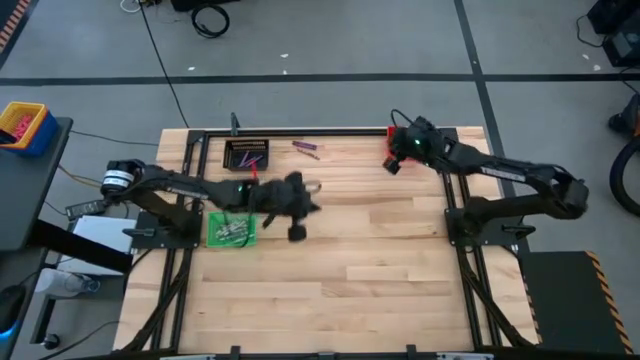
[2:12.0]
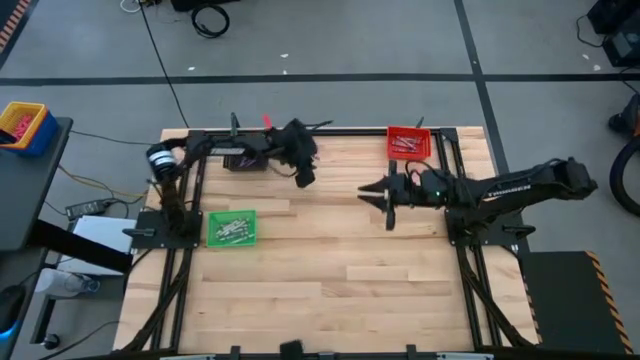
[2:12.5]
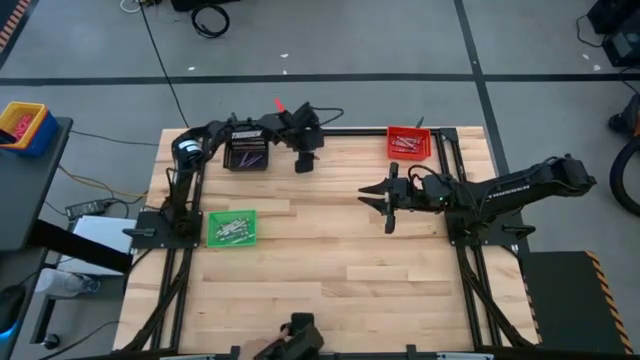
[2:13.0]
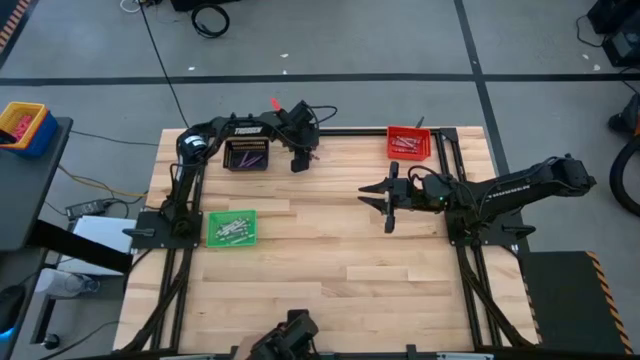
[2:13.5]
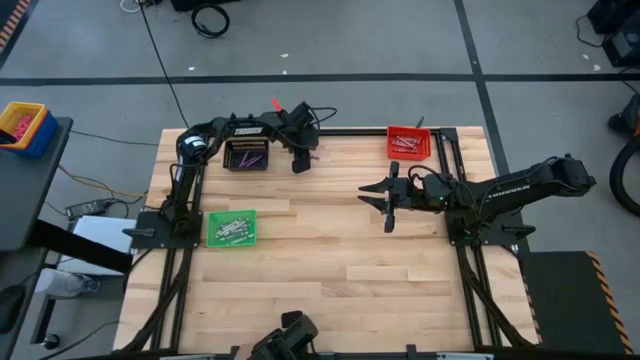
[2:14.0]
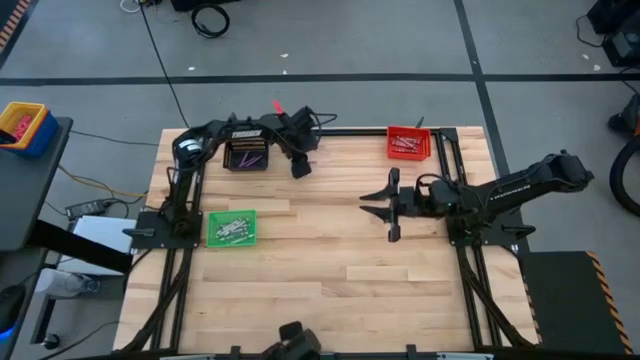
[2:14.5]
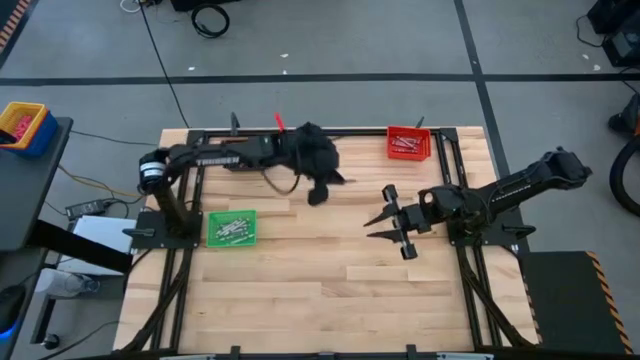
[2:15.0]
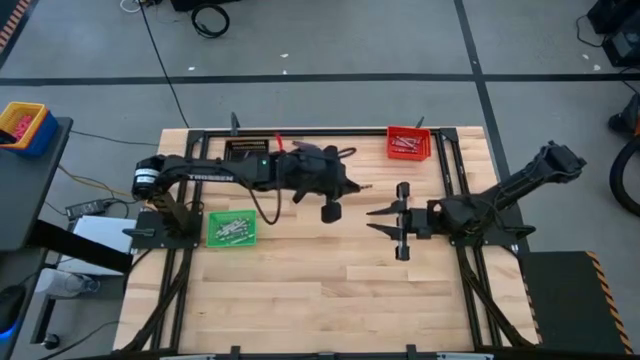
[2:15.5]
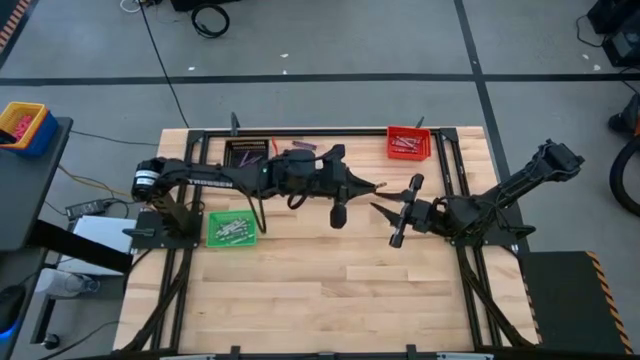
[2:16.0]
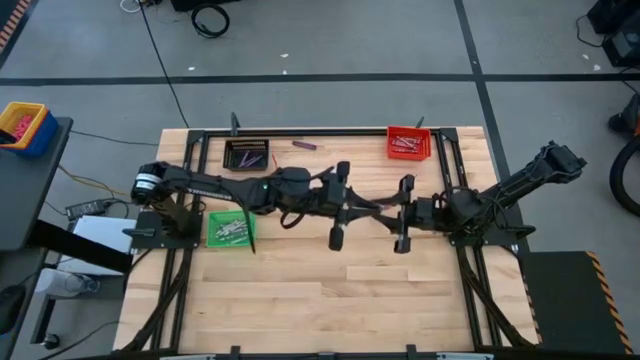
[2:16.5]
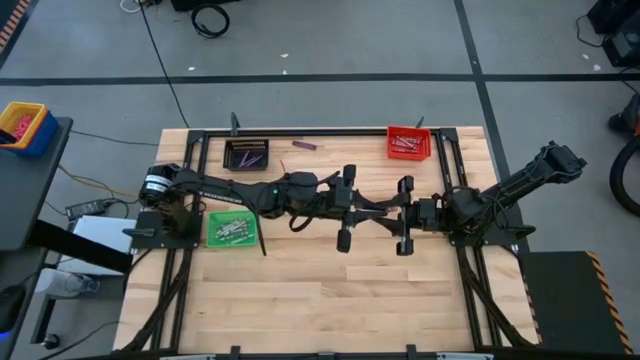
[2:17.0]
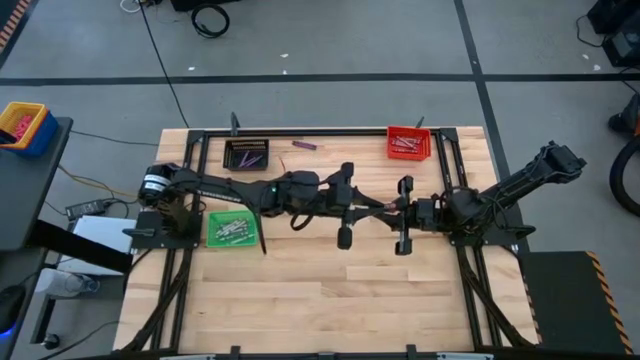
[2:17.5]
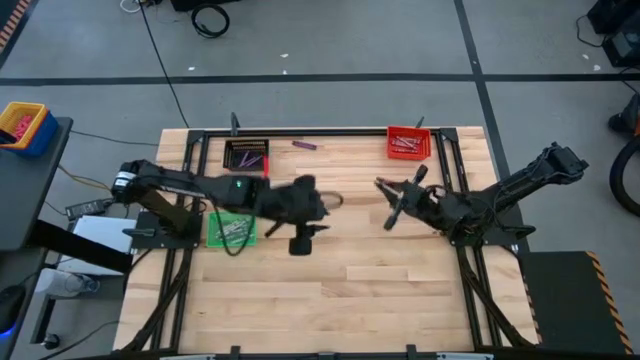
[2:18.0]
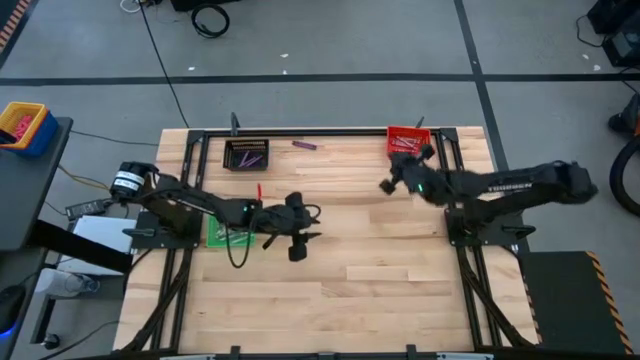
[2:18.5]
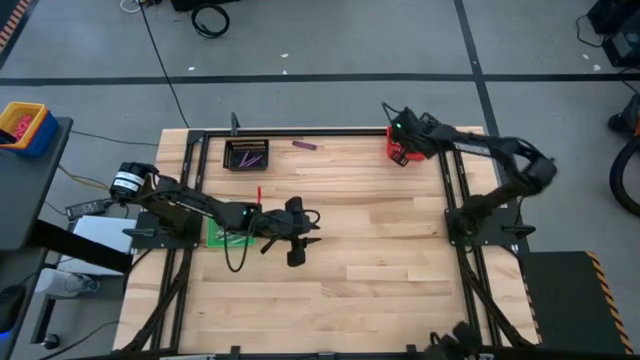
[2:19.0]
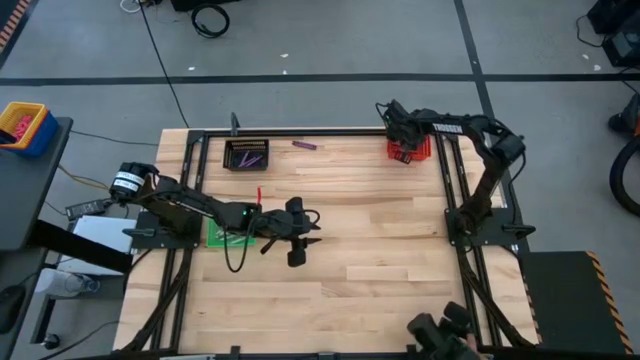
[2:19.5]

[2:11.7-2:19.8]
Task: Sort crayons
Put the pink crayon into the red bin

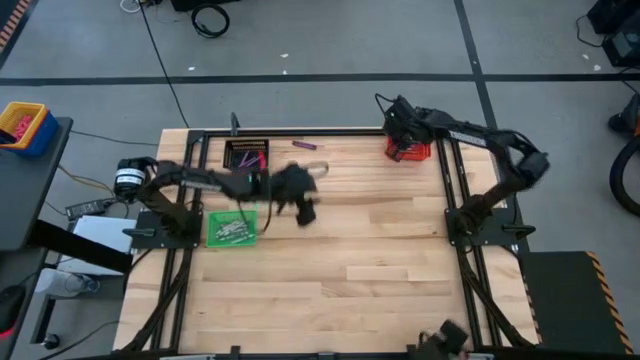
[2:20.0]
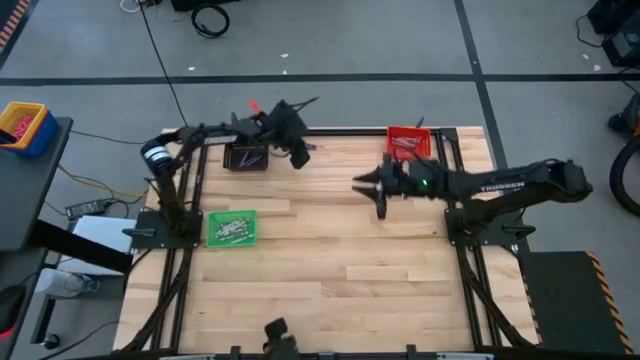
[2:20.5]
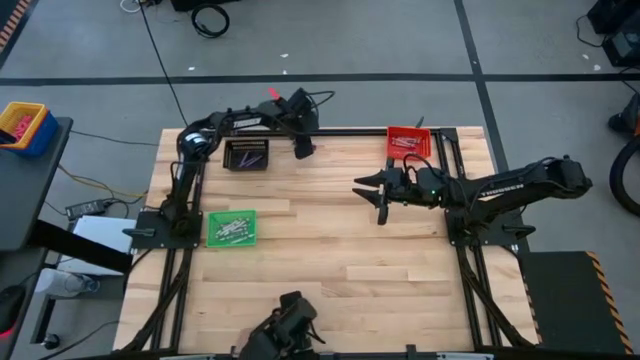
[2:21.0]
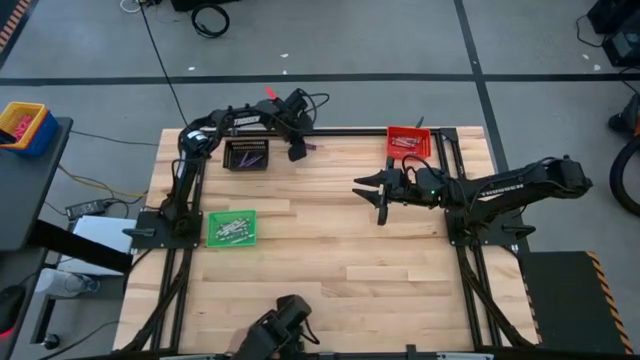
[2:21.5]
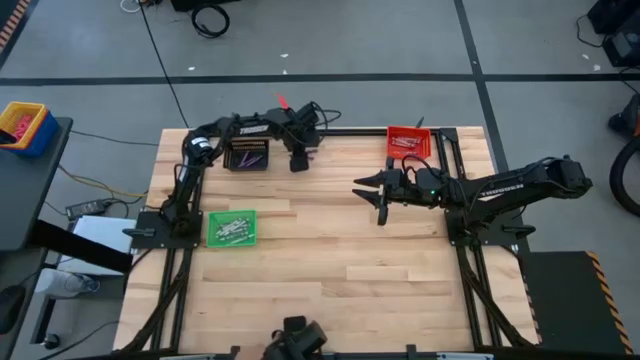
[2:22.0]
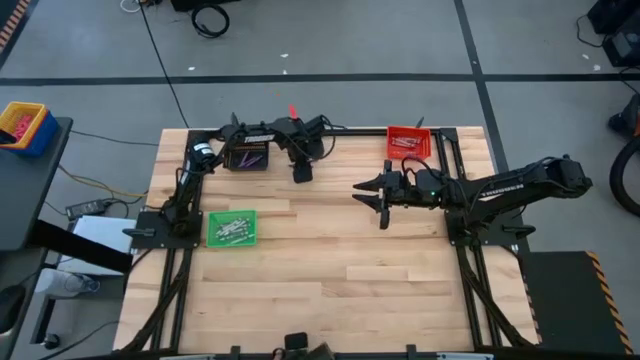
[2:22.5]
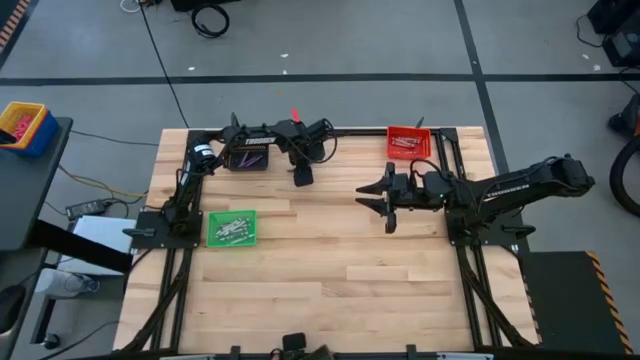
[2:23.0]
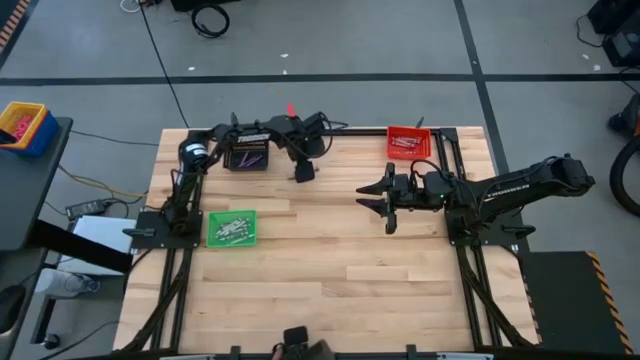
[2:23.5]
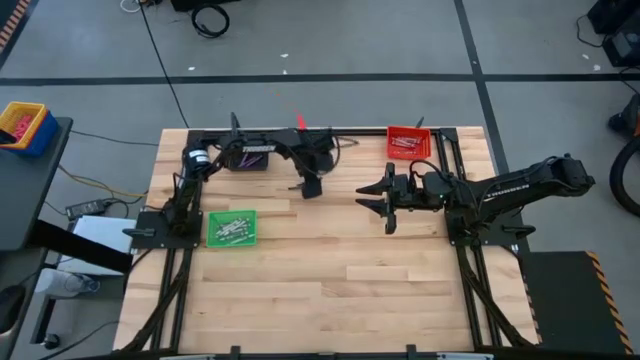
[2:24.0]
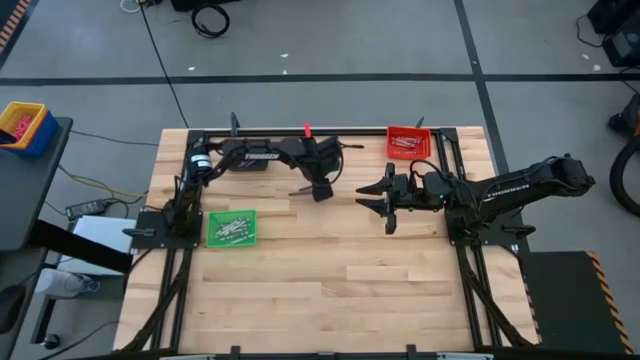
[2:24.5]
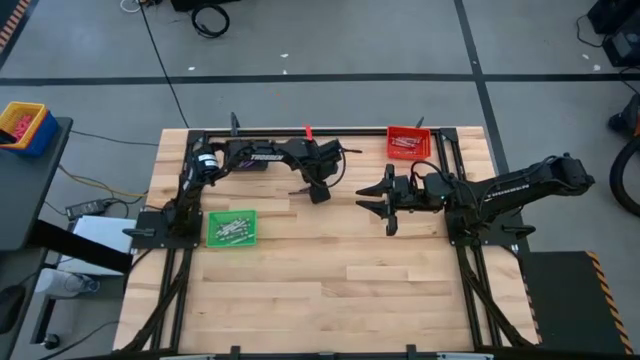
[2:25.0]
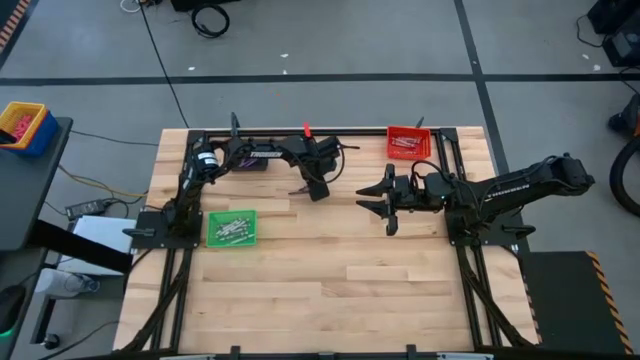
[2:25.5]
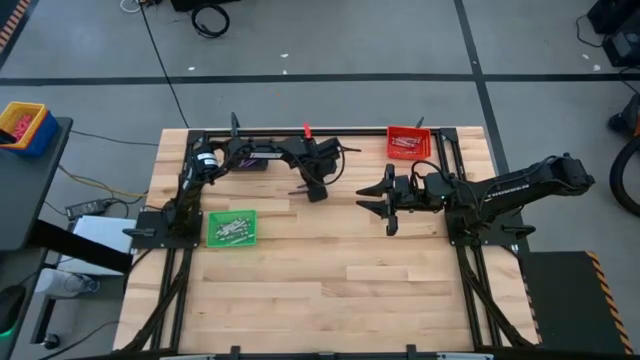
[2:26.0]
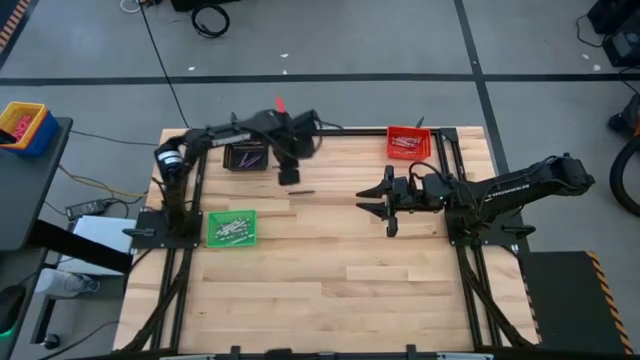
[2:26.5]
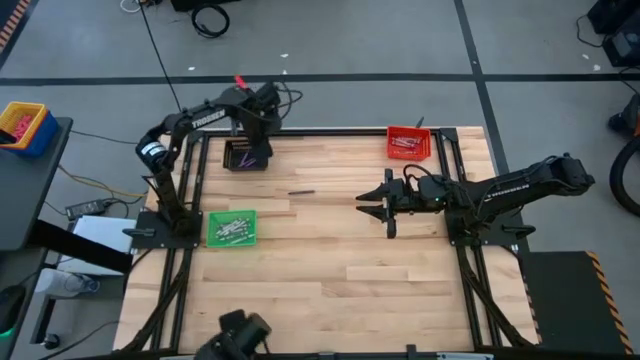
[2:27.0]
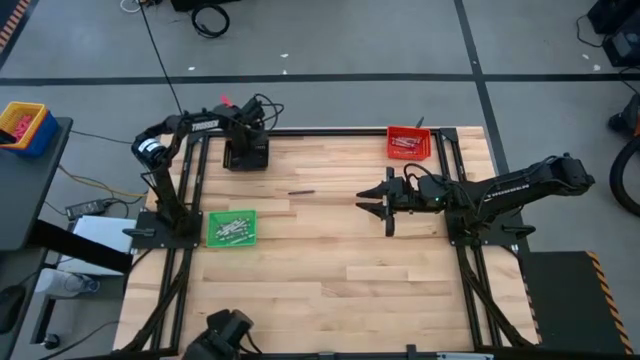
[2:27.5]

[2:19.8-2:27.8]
Put the violet crayon into the black bin

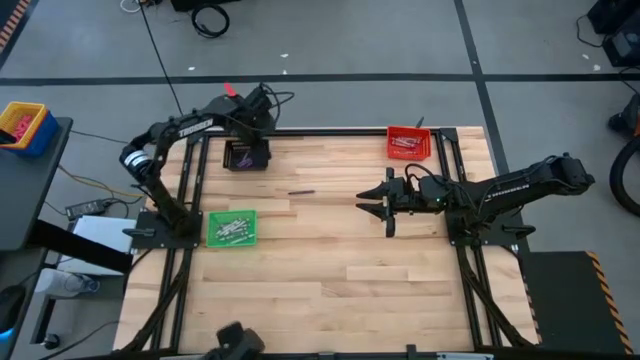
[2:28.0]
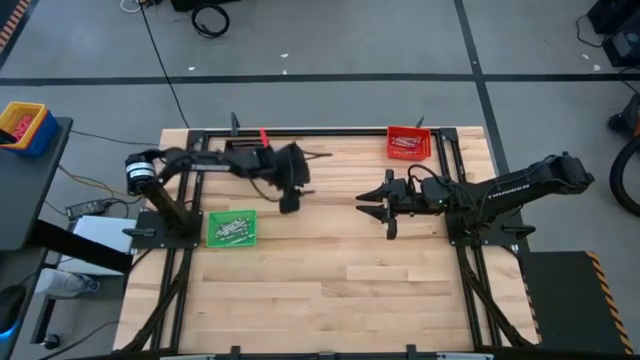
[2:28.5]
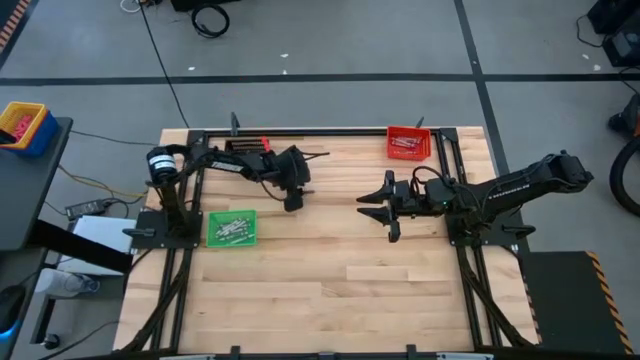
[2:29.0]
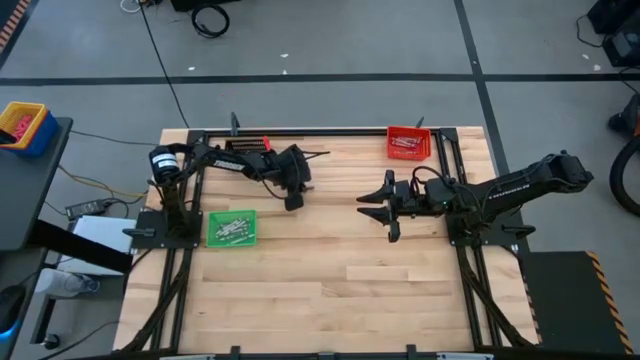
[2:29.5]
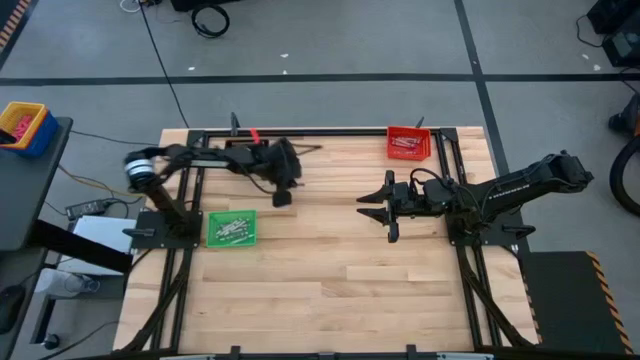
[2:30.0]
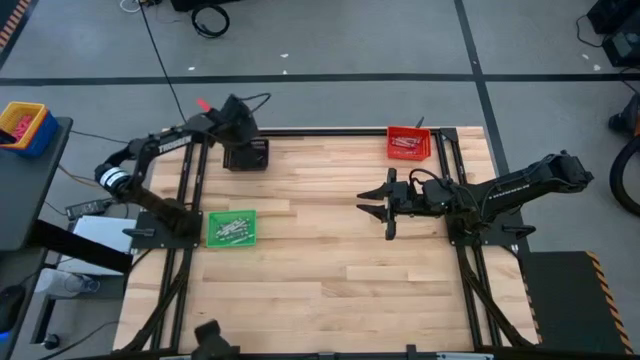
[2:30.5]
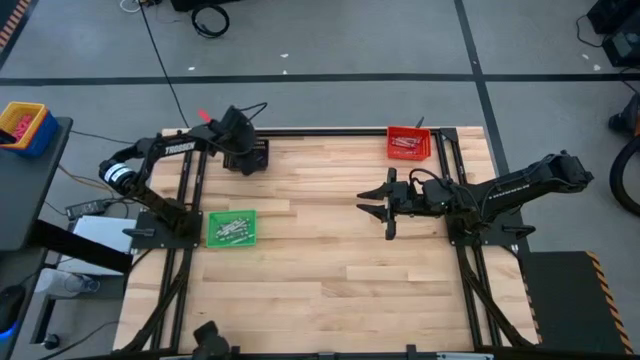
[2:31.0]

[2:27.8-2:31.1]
Put the violet crayon into the black bin
